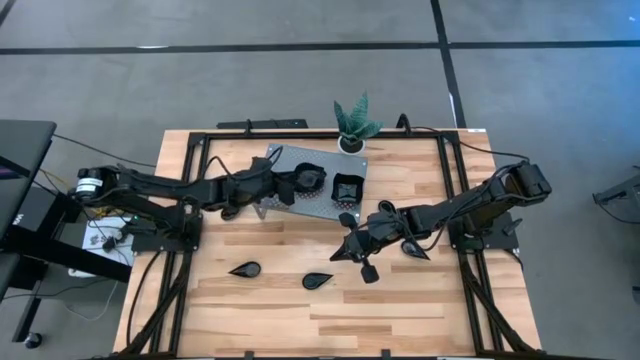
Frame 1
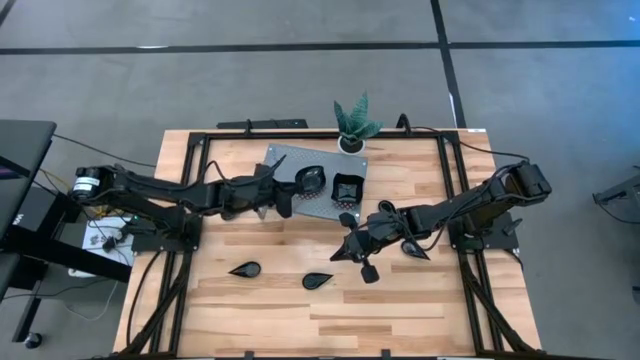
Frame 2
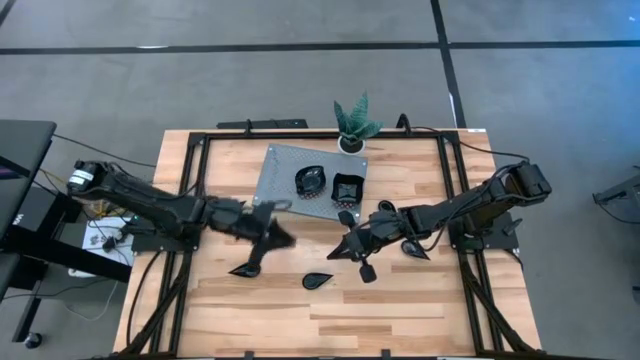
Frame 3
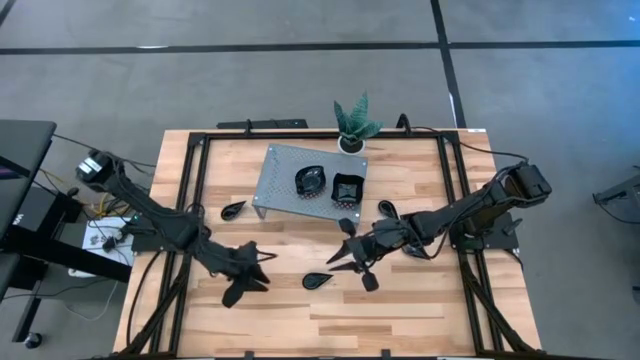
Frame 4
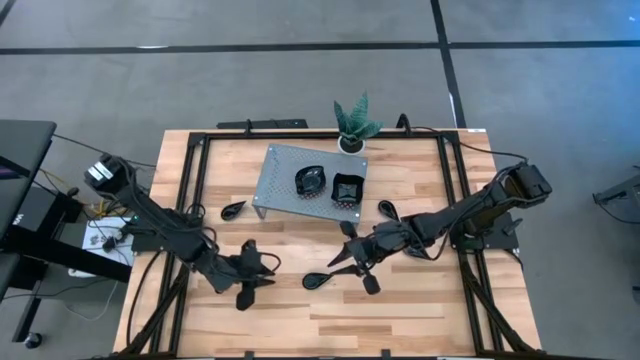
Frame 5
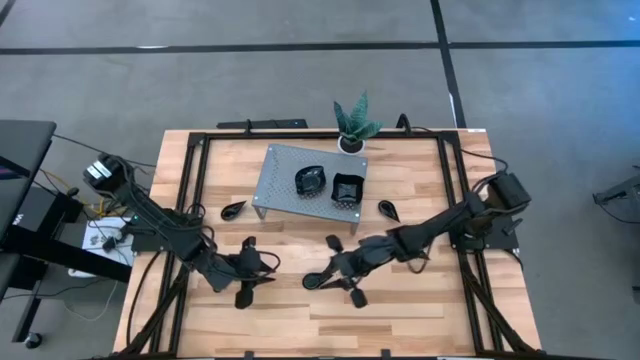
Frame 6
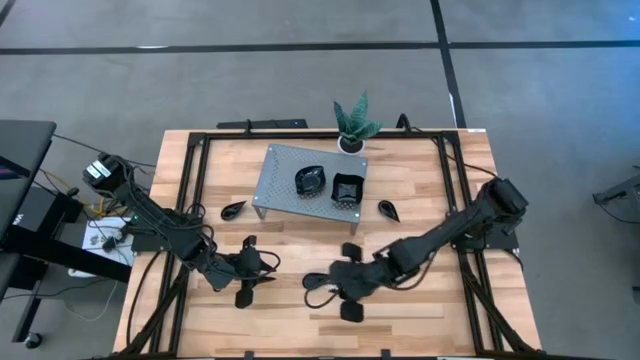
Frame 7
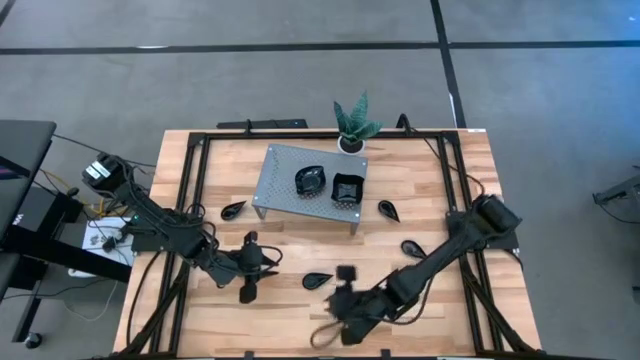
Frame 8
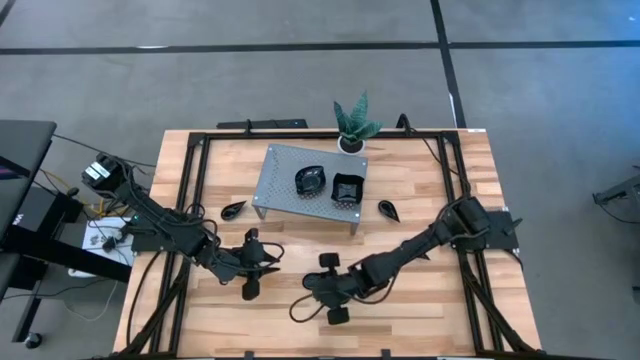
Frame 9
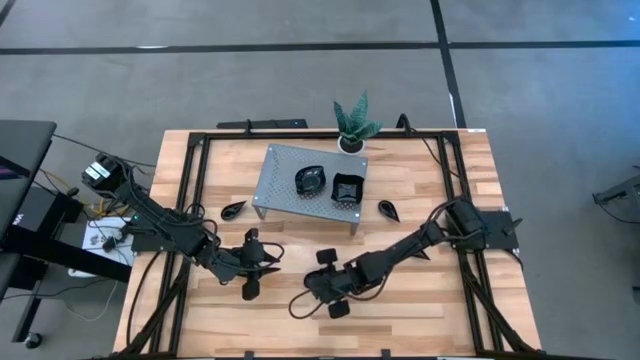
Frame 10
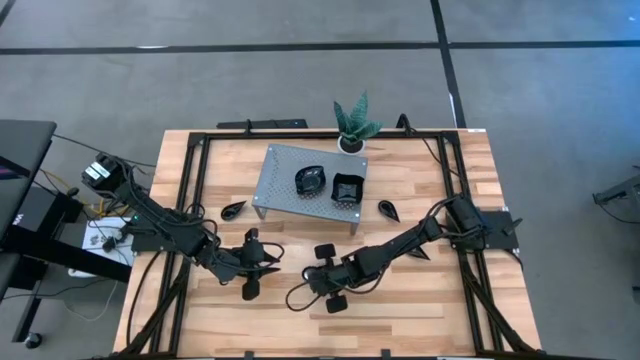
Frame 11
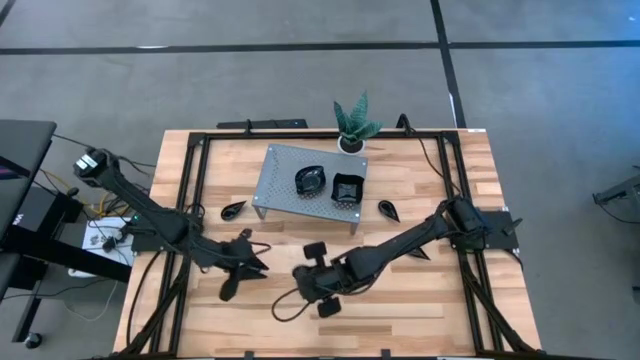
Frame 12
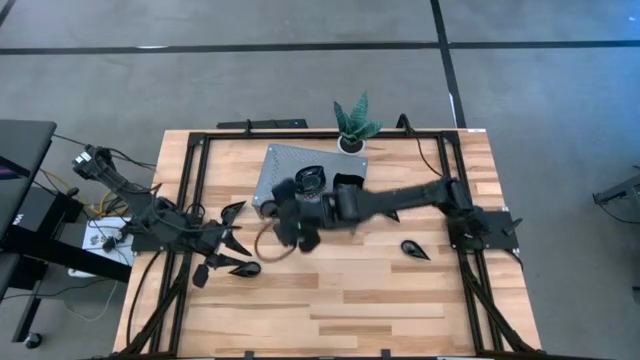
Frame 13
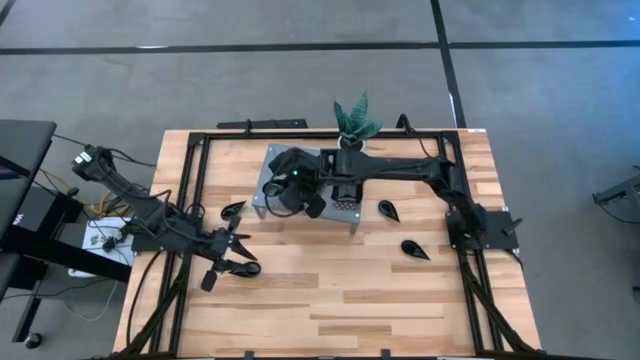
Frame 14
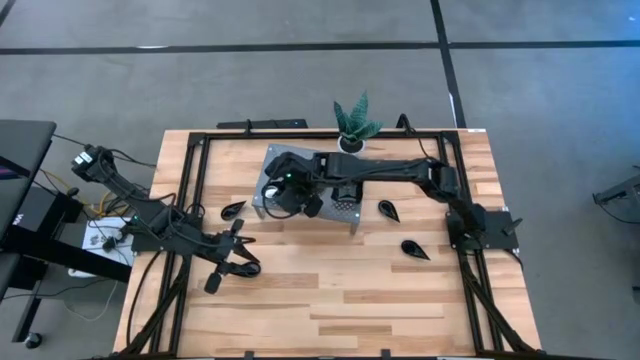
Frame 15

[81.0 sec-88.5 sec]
Task: Pick & Place Mini shaped plates
Put the drop shaped plate on the shelf

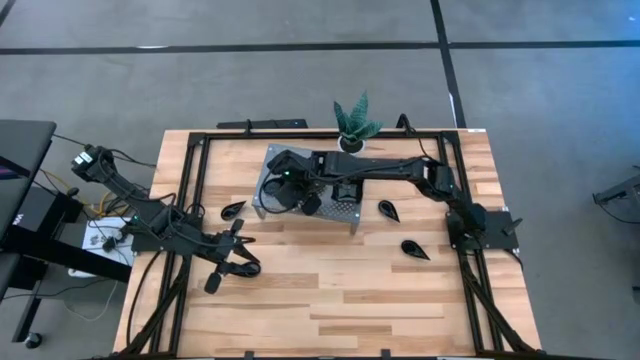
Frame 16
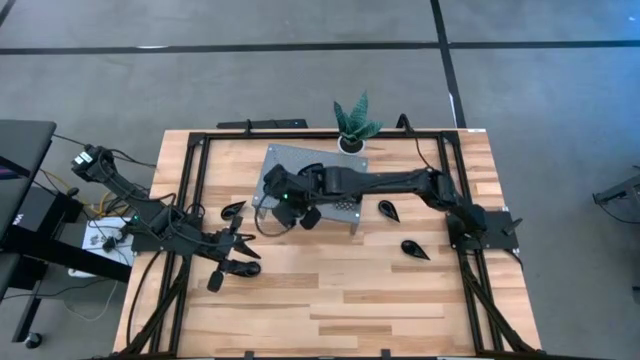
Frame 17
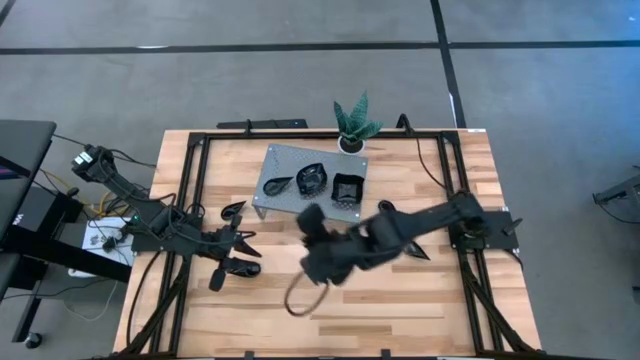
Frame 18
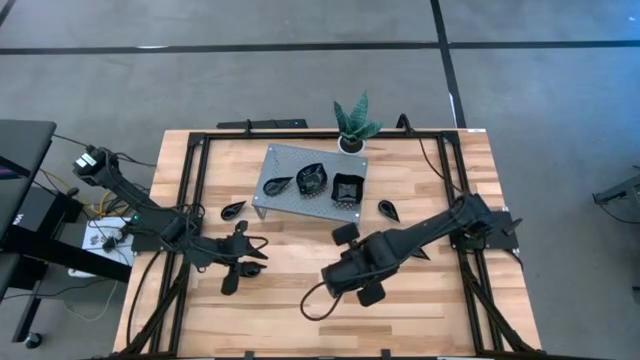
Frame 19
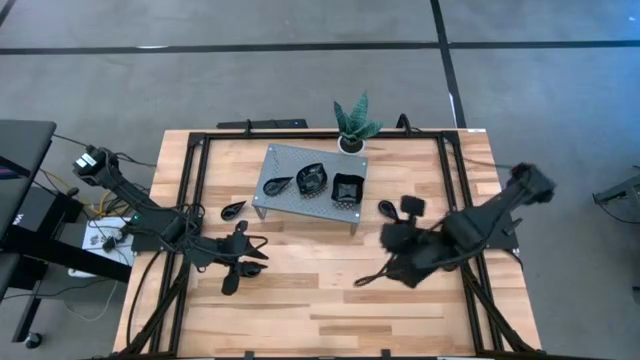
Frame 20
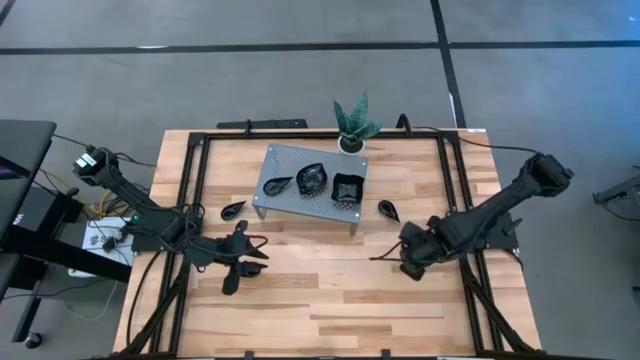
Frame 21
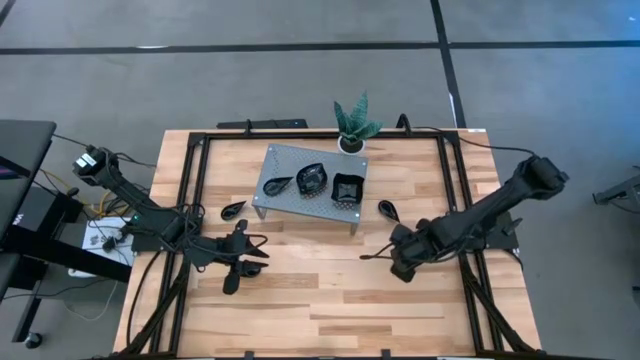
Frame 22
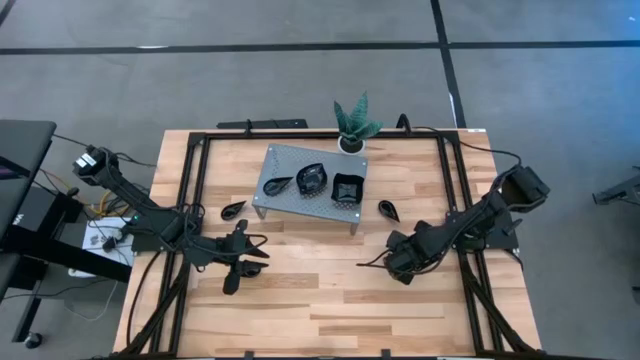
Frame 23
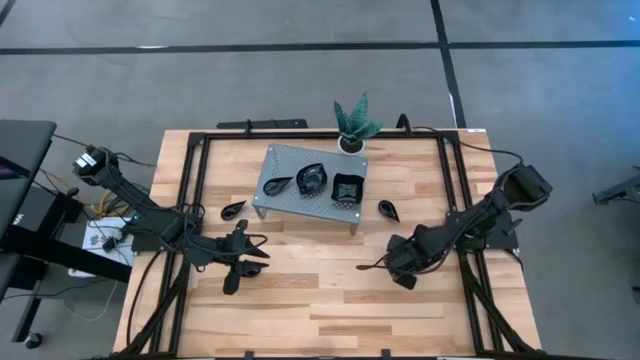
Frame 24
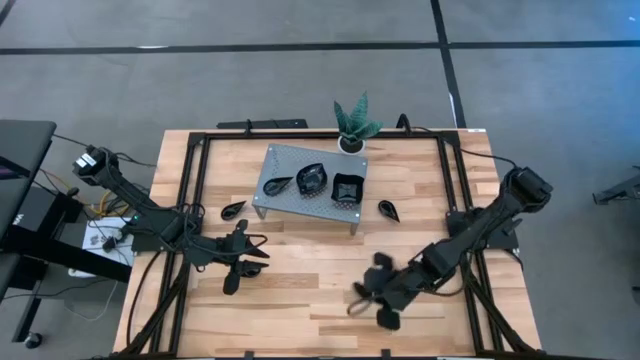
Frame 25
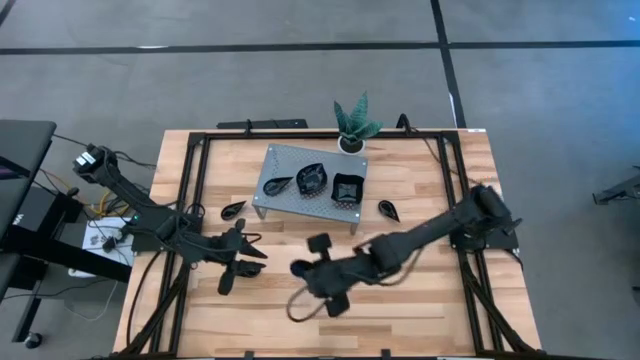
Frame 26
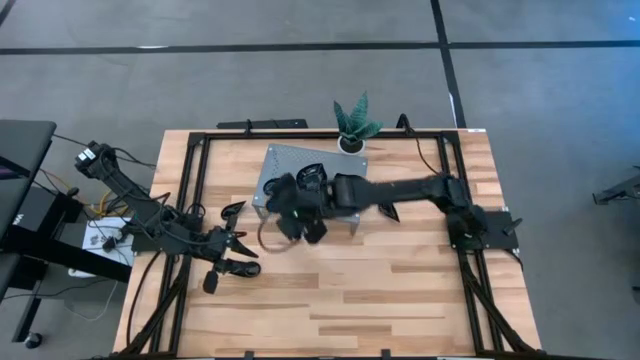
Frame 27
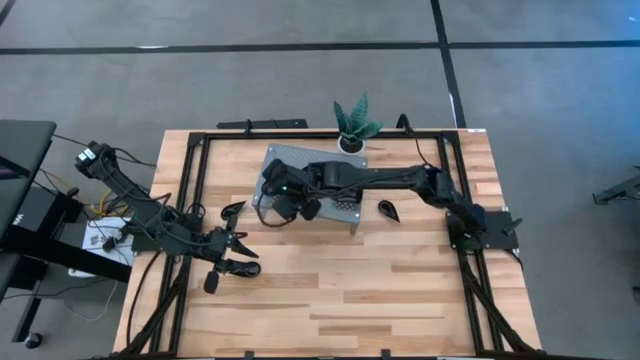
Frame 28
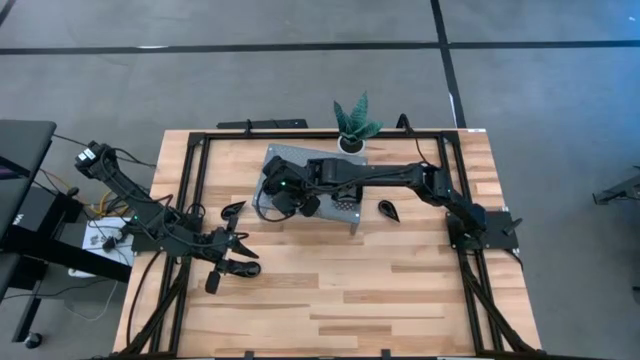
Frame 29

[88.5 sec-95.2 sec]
Stack the drop shaped plate on top of the drop shaped plate on the shelf

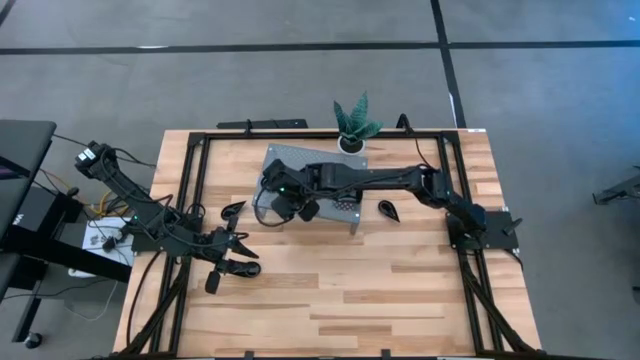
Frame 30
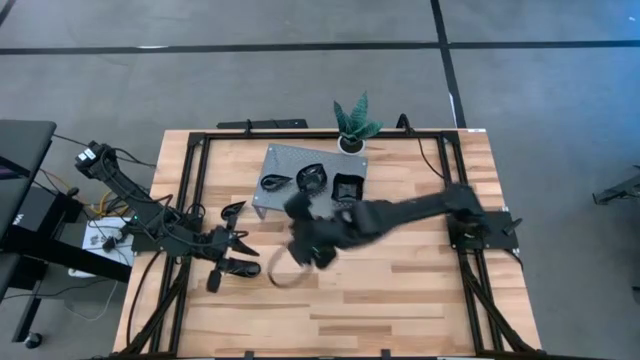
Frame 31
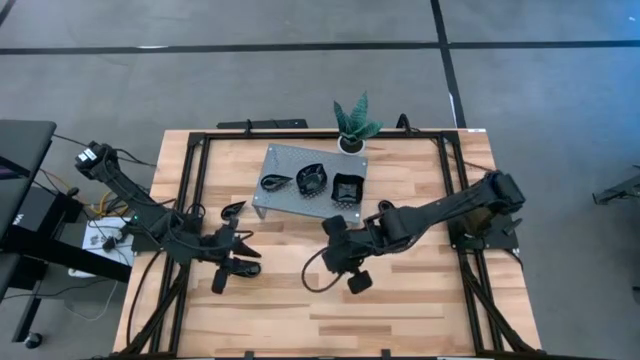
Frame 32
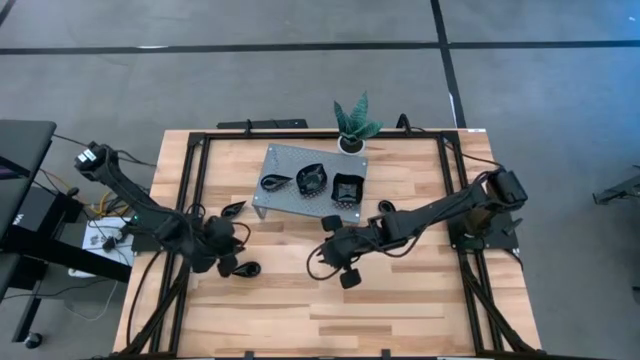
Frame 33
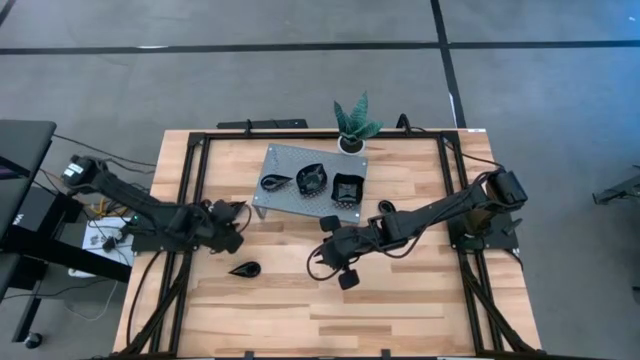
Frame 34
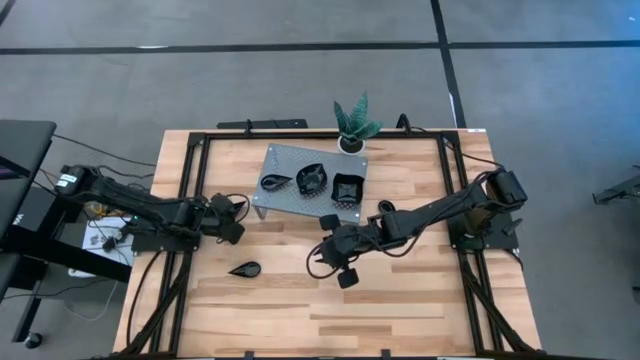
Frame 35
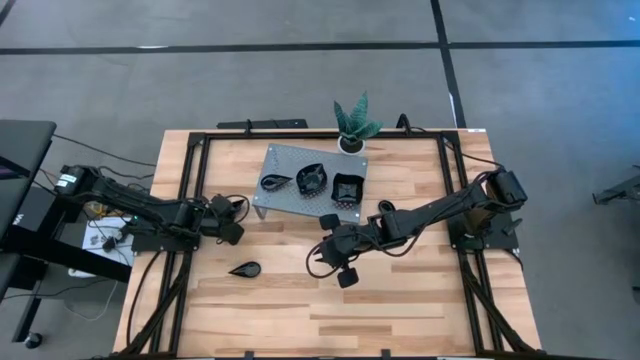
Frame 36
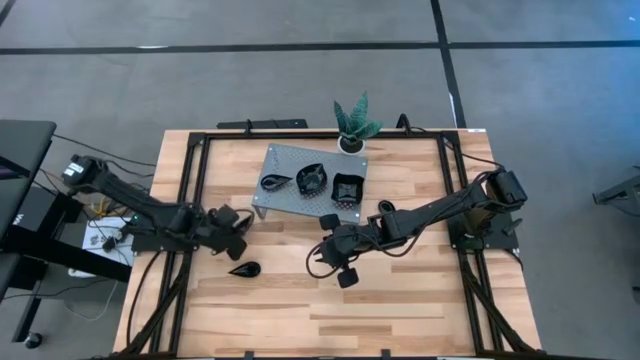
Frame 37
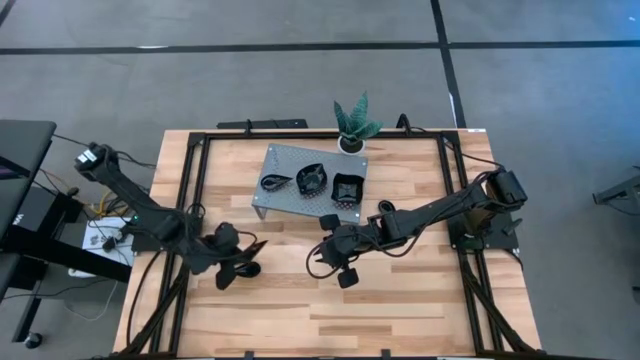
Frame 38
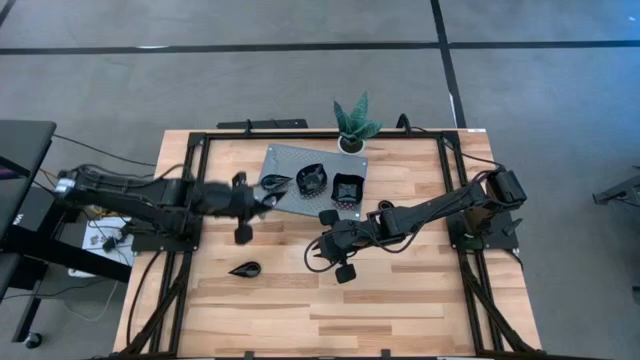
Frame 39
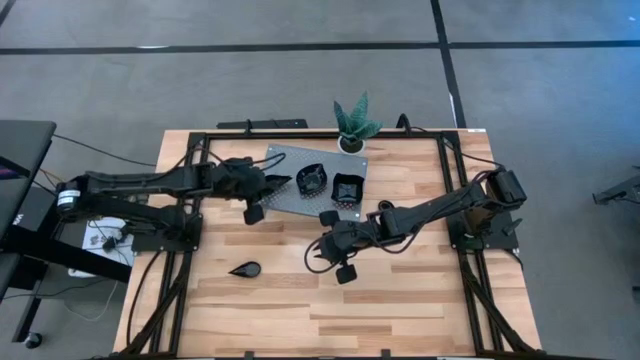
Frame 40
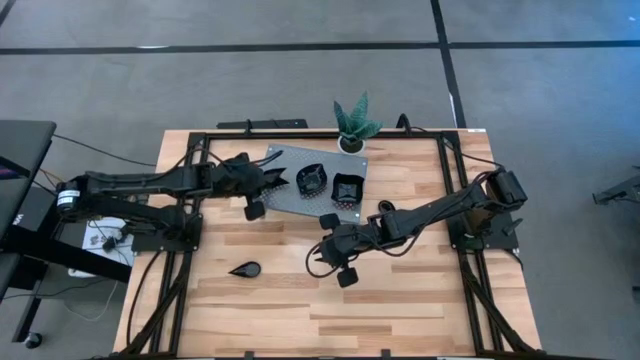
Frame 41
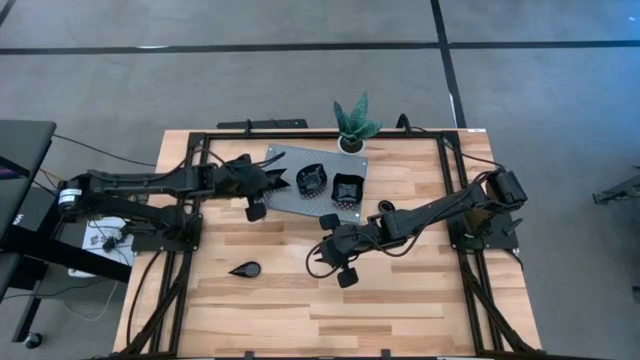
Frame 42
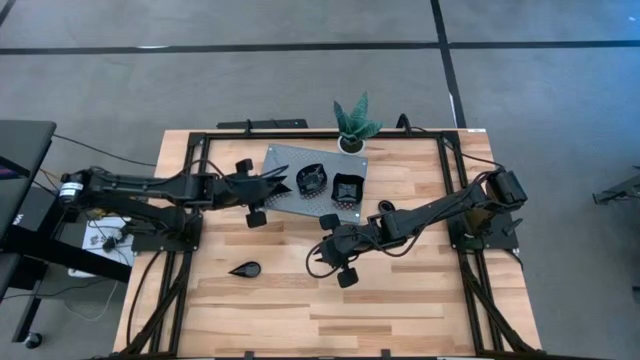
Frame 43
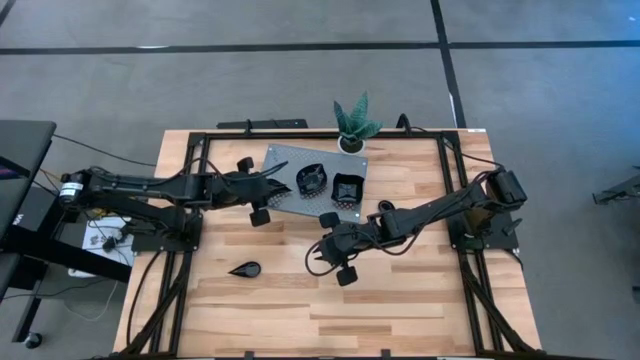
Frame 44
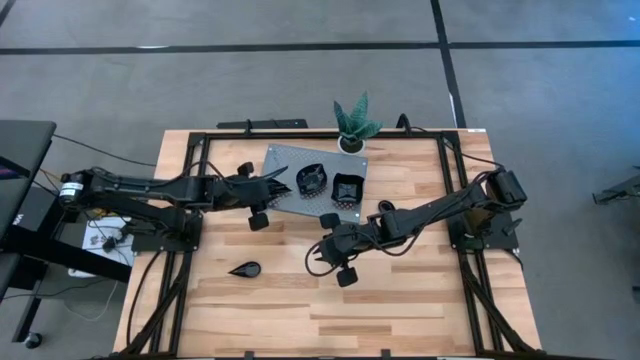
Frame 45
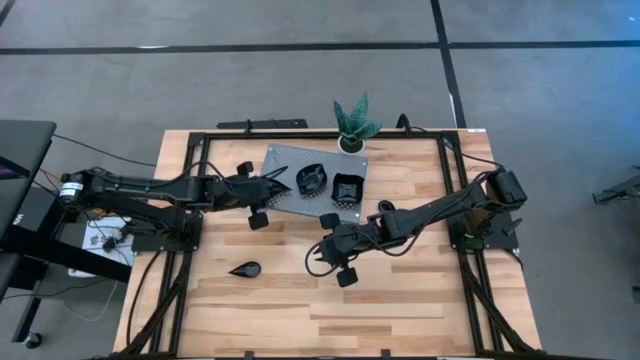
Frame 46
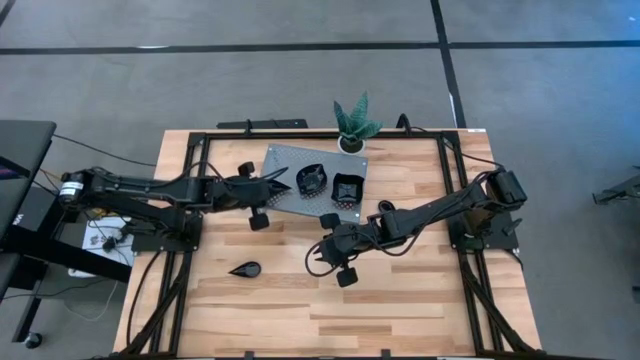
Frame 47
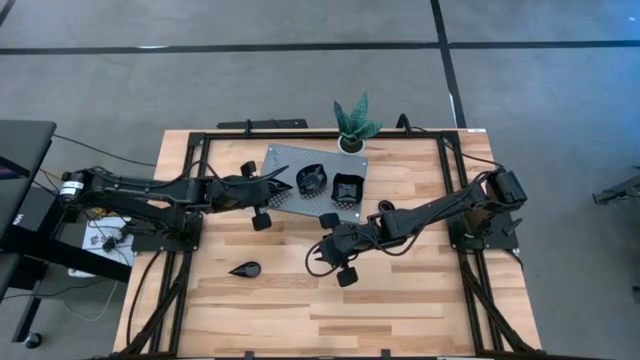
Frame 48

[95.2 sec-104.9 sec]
Stack the drop shaped plate on top of the drop shaped plates on the shelf
